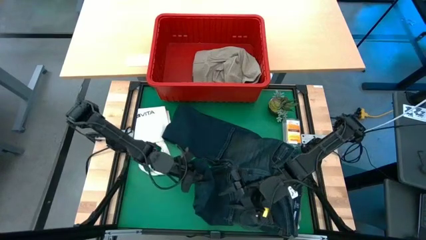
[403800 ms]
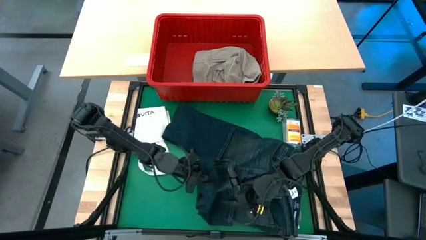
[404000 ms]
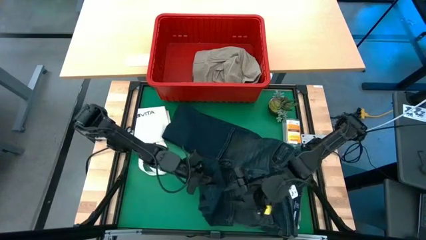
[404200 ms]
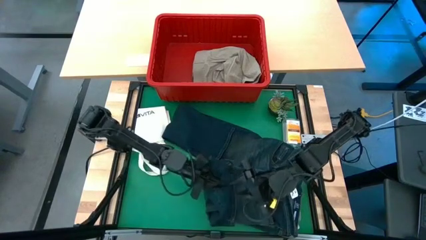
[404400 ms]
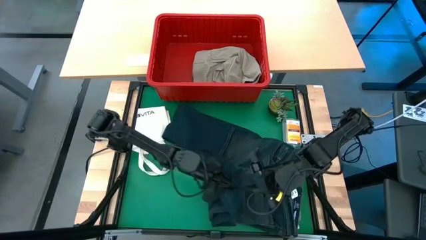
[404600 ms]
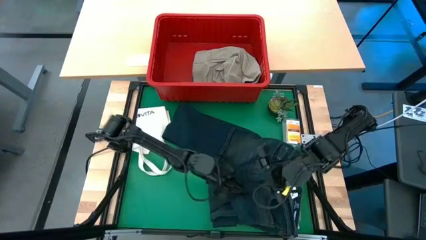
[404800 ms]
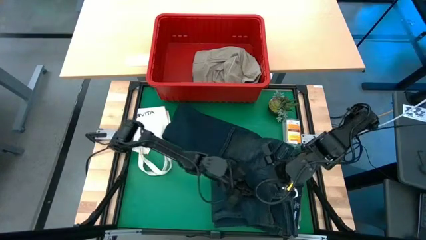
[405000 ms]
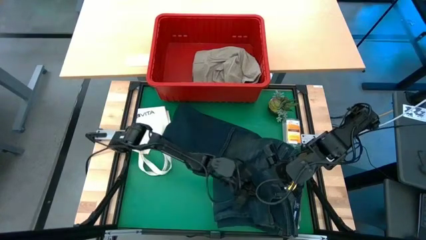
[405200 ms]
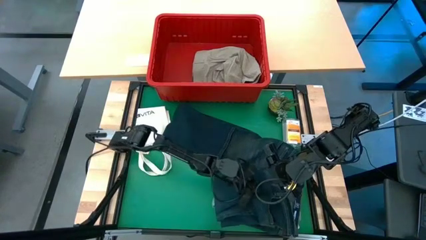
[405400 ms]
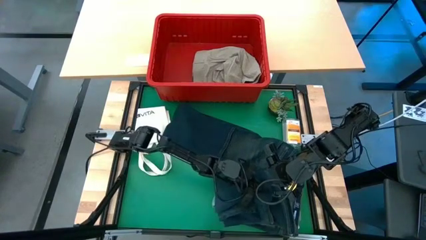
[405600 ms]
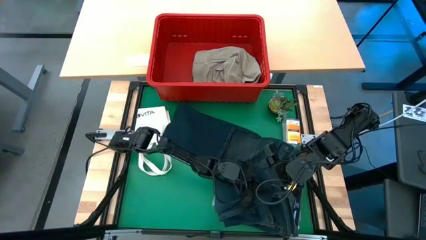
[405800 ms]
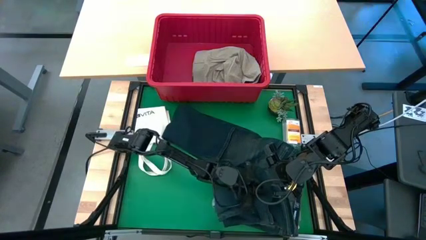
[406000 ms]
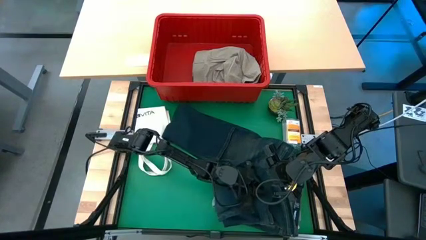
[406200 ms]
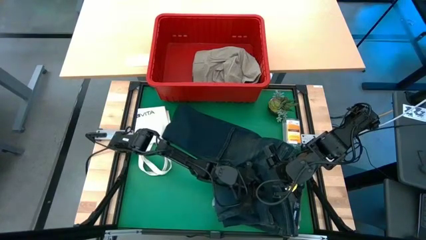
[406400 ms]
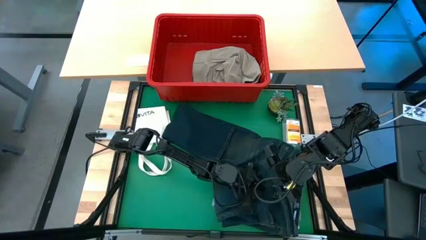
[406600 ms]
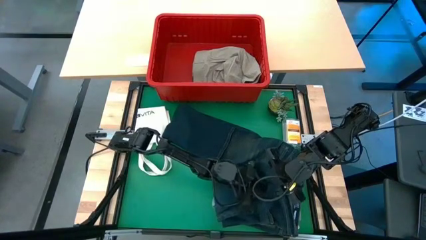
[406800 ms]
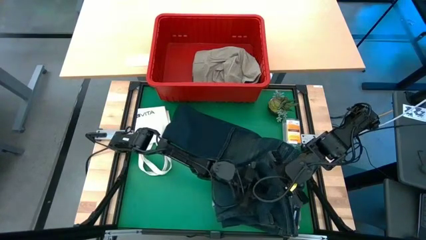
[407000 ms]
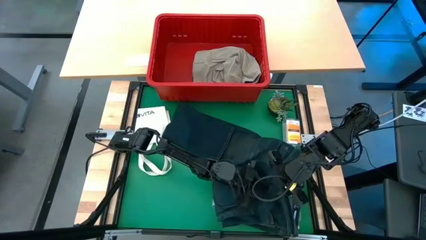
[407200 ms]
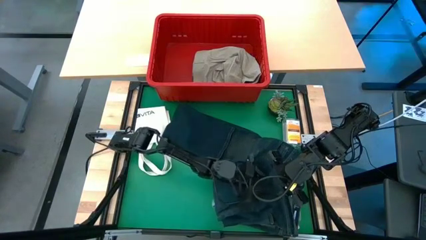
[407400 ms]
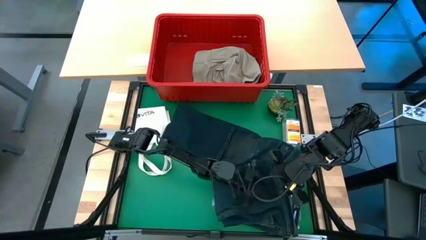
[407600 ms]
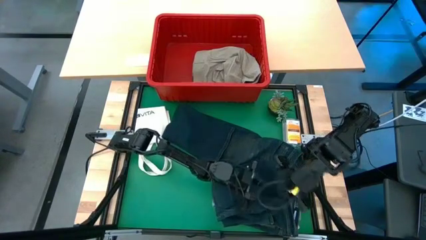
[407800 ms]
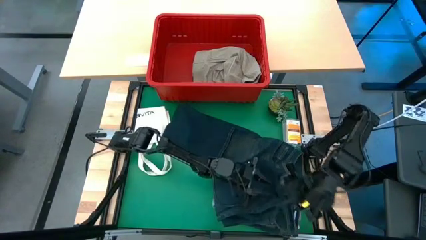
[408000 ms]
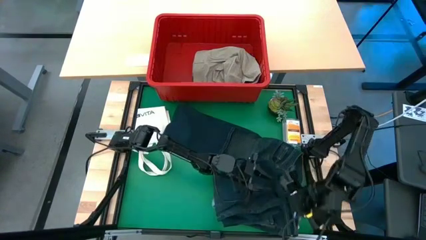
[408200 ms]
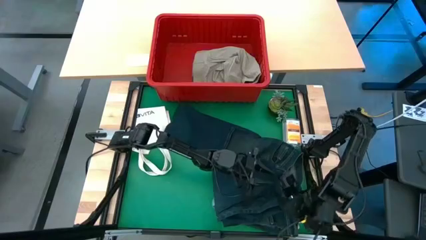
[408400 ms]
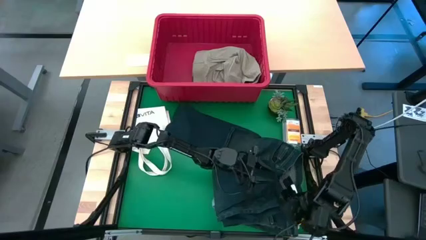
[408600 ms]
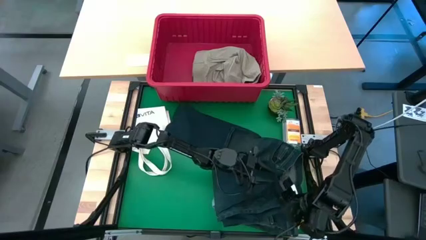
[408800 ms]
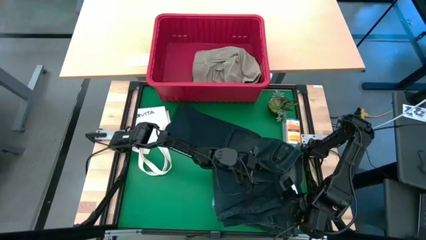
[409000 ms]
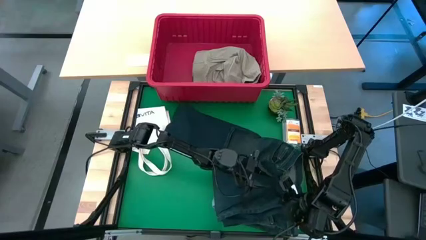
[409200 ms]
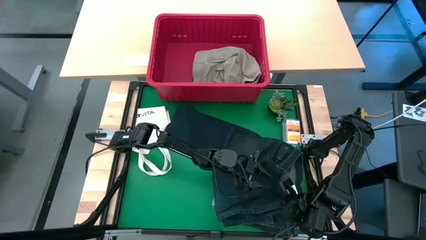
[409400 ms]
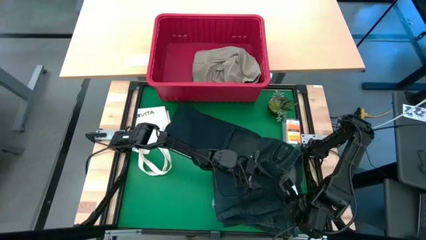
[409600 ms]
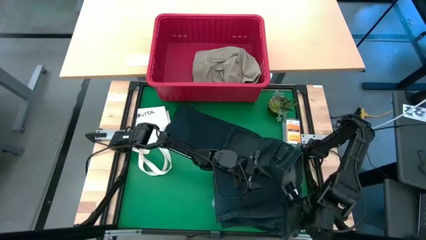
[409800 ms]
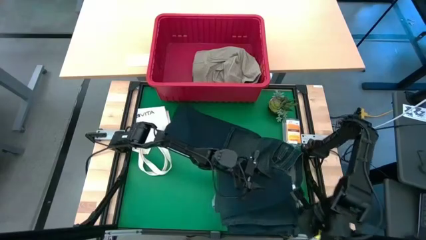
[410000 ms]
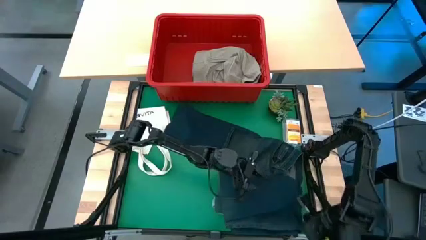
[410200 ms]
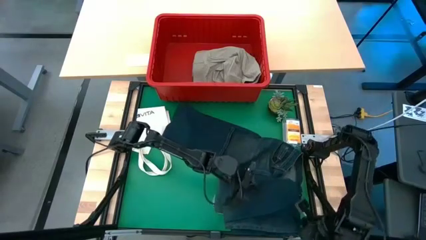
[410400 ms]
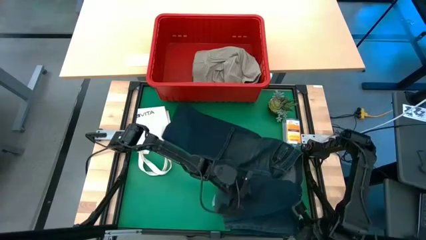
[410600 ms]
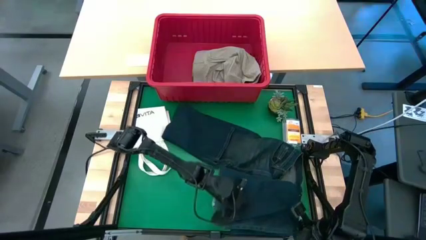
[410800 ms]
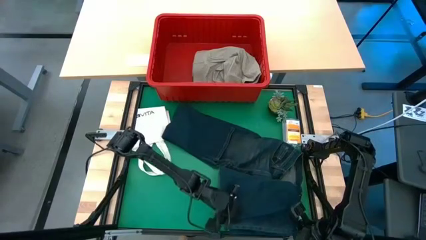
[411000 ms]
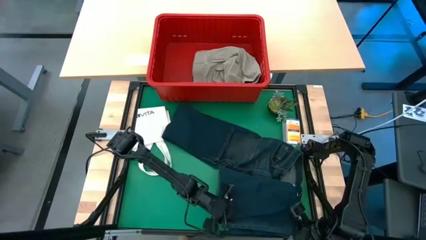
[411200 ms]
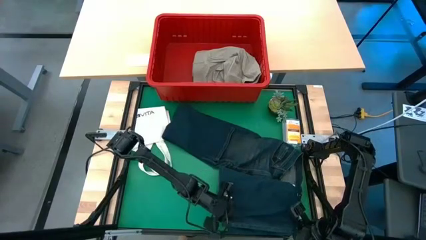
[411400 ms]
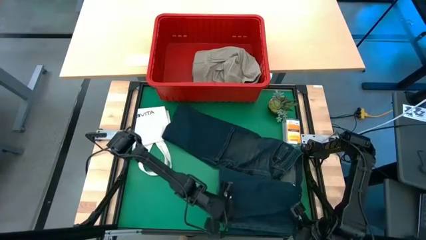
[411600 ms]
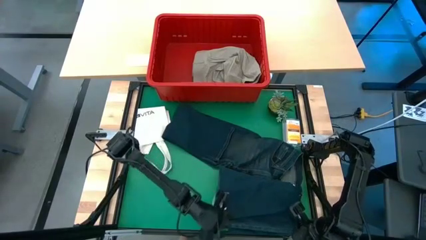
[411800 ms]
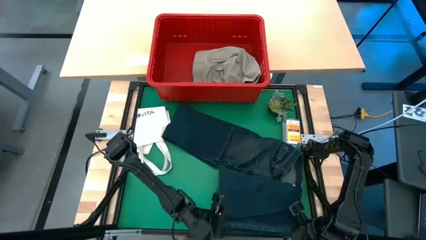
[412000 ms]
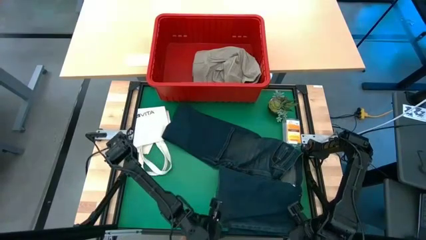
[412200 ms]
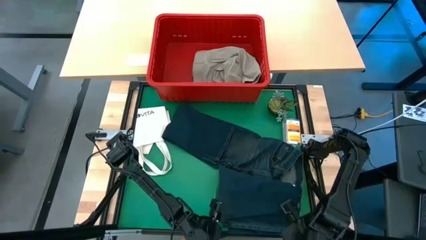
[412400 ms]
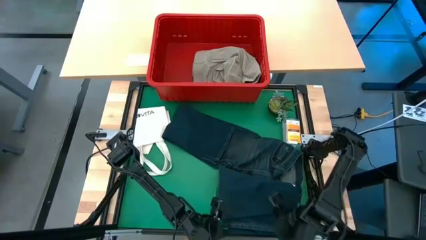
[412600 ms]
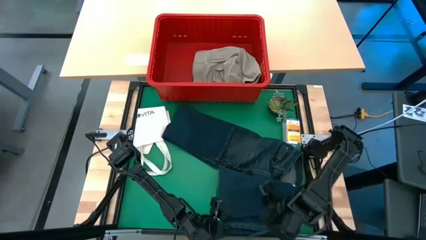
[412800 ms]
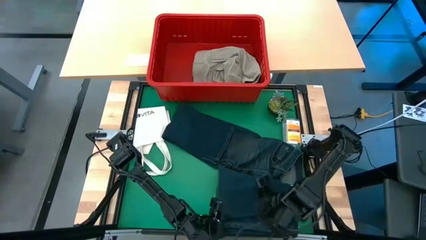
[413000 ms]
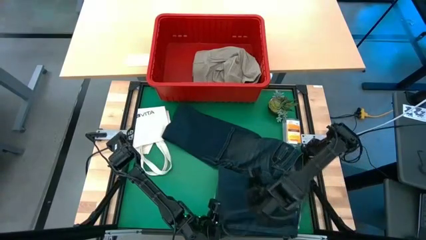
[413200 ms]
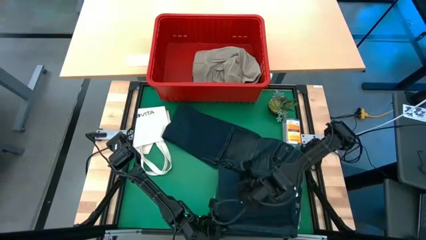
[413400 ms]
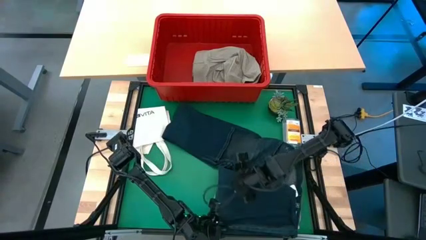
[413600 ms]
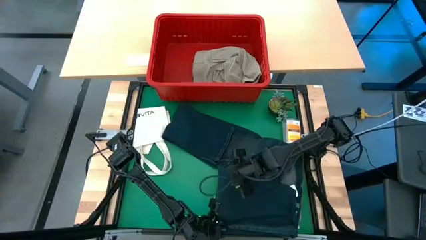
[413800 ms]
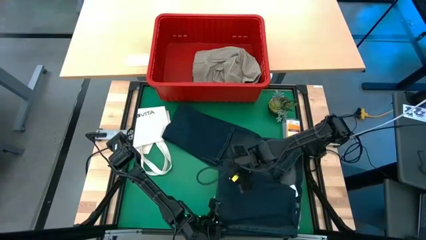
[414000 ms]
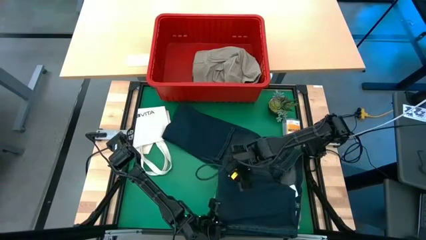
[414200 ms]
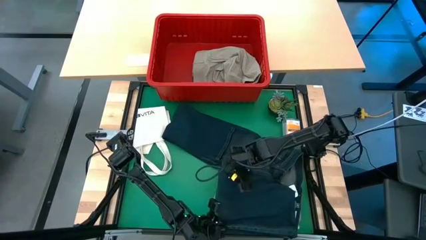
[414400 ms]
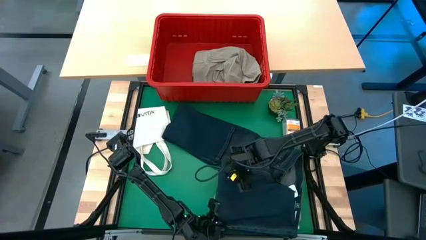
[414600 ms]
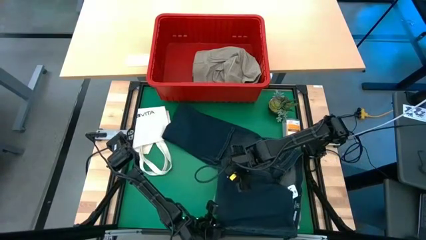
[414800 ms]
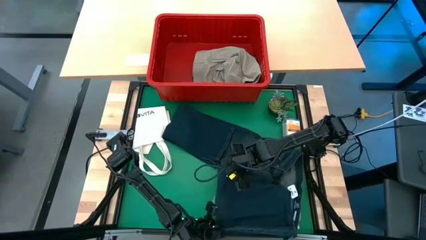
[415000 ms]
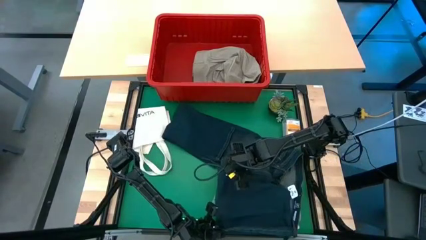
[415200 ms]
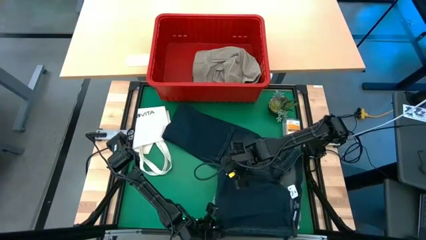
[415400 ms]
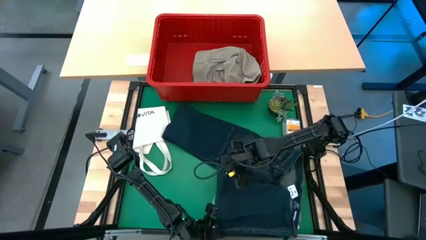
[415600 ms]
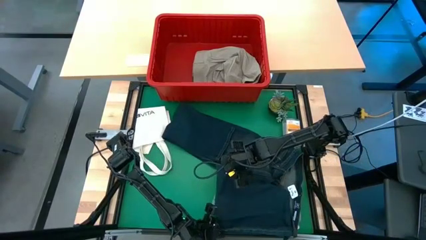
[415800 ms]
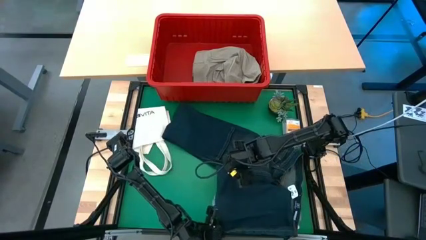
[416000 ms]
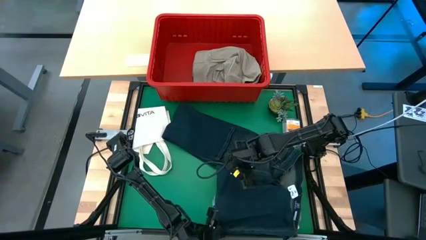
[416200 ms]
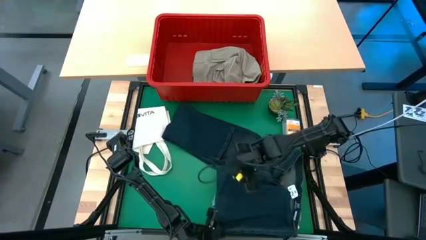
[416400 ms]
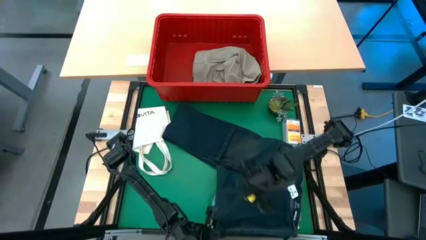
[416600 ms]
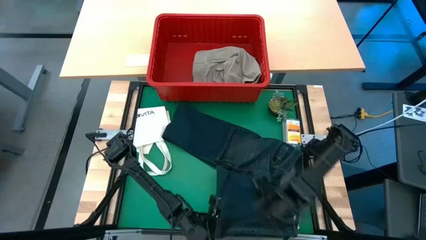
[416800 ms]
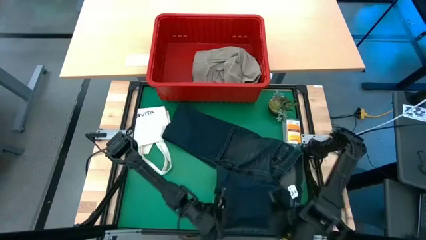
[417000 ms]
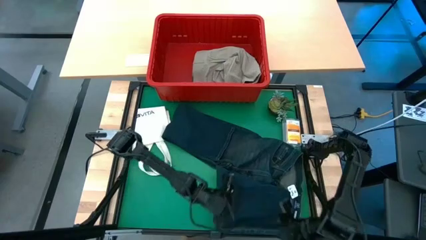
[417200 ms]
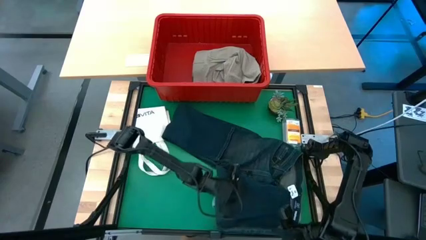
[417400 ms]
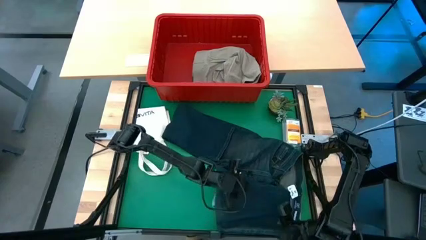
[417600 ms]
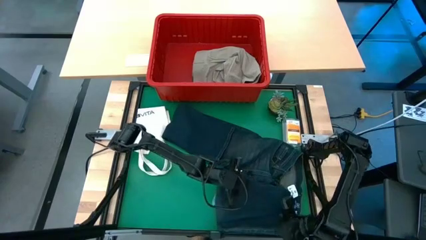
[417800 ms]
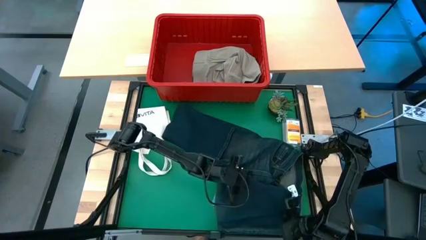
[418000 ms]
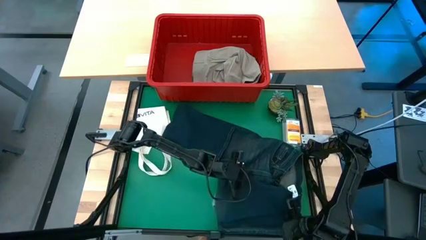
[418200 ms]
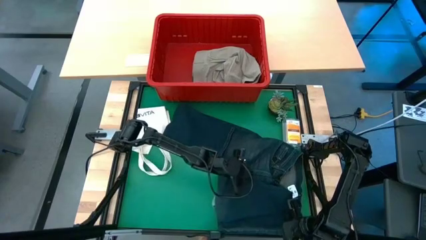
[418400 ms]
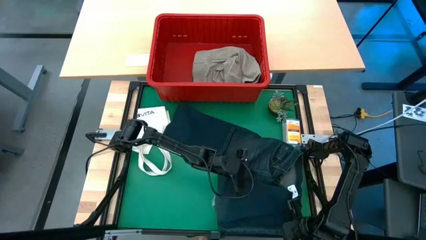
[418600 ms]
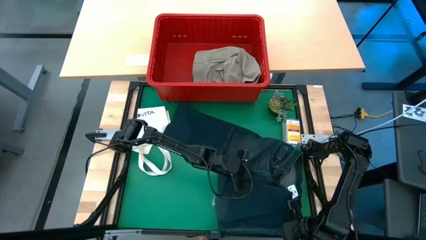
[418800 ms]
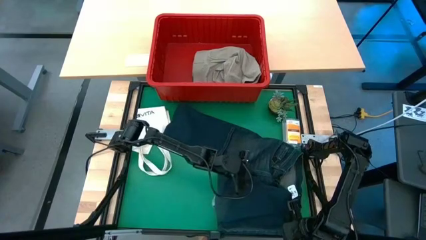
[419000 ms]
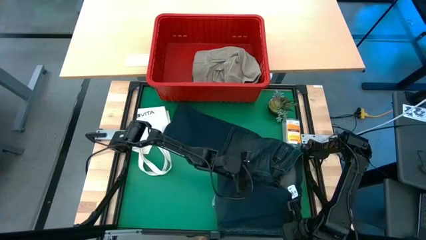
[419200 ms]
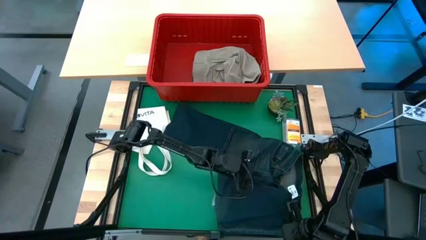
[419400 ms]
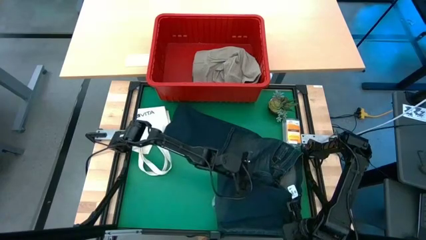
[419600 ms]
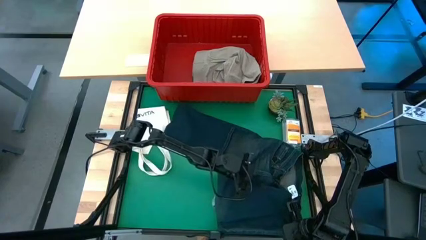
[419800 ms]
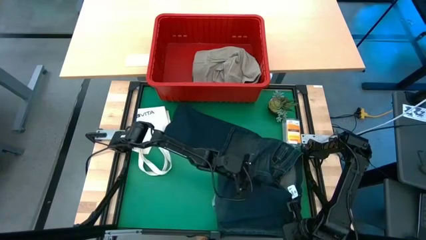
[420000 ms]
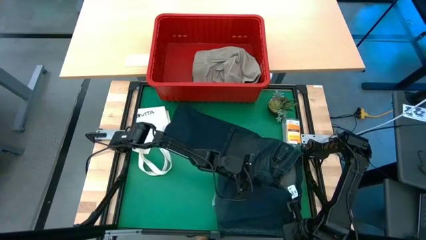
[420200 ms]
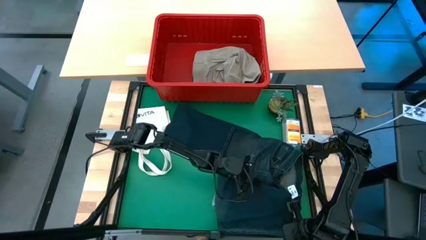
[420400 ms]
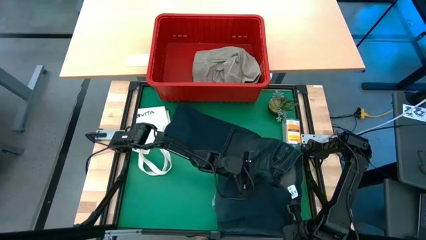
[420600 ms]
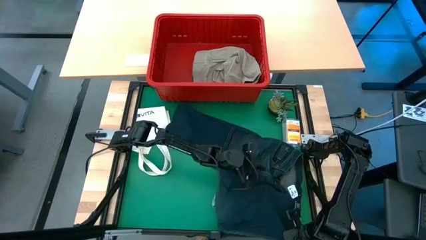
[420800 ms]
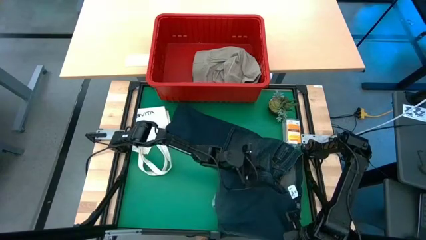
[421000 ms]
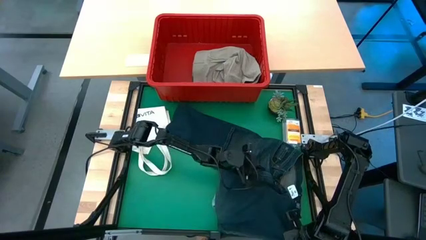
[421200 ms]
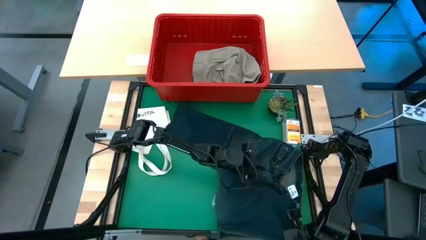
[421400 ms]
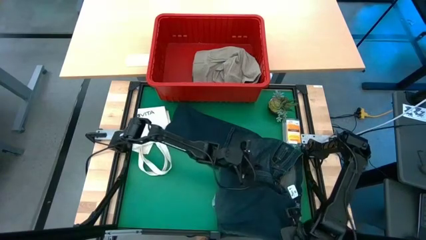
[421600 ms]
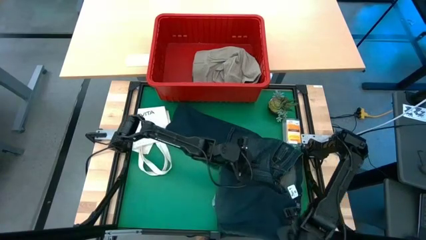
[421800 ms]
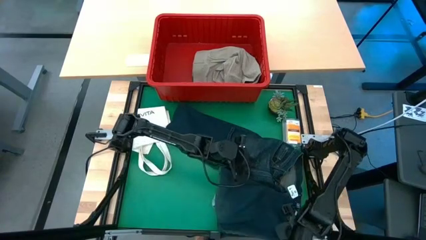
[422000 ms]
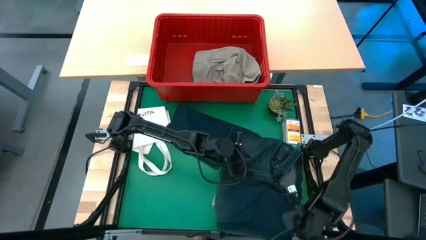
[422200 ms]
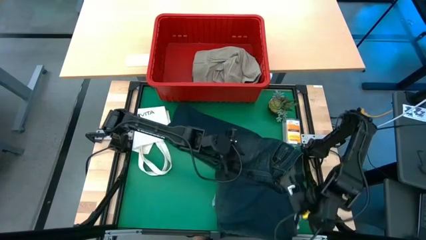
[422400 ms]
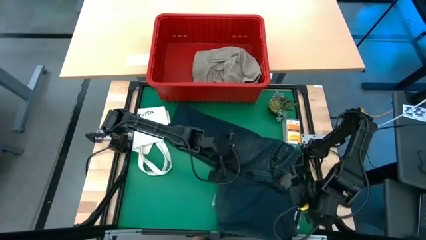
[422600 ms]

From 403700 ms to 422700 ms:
Task: Fold Laundry from Bin
Fold the dark blue jeans
